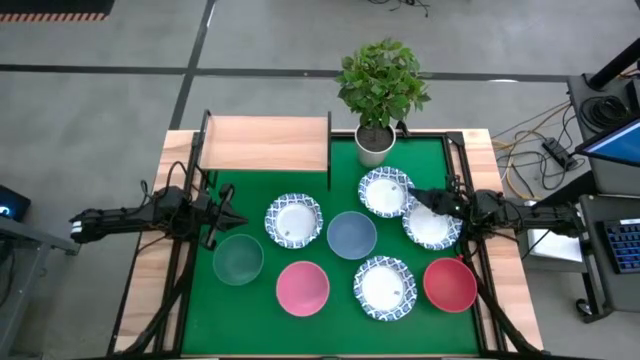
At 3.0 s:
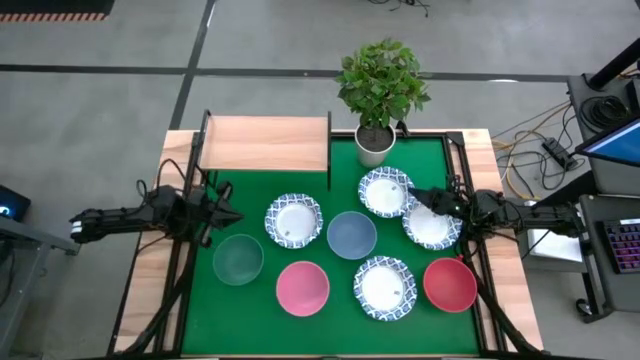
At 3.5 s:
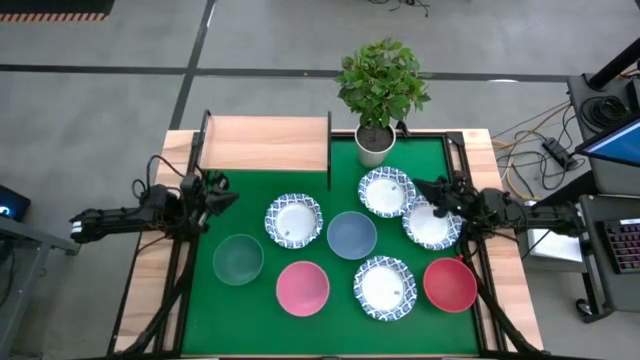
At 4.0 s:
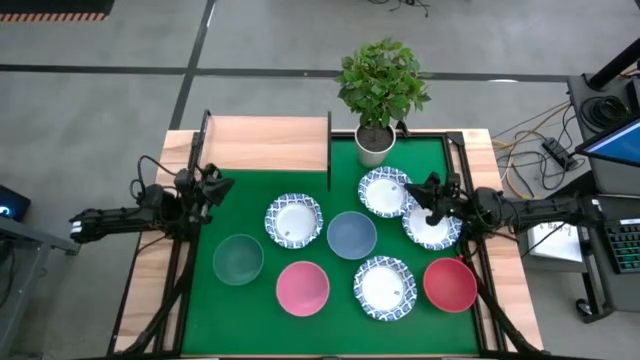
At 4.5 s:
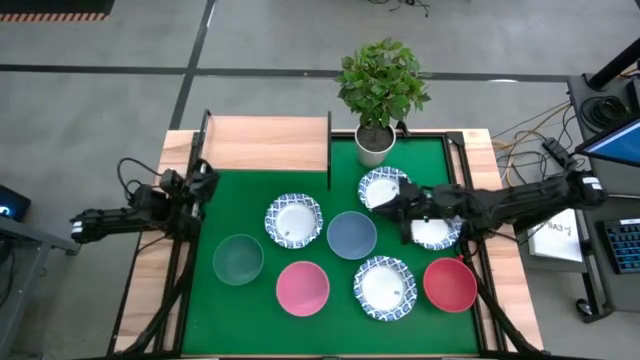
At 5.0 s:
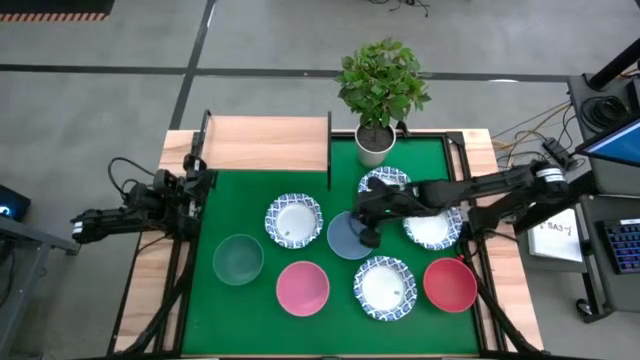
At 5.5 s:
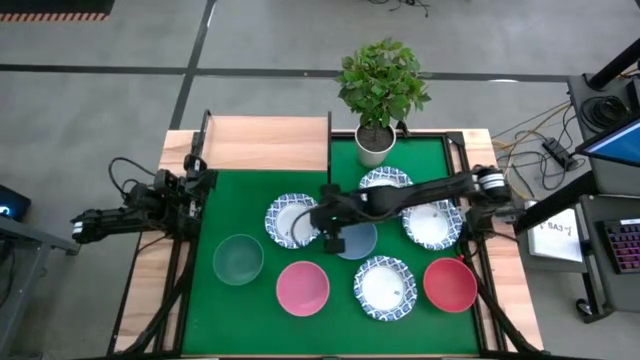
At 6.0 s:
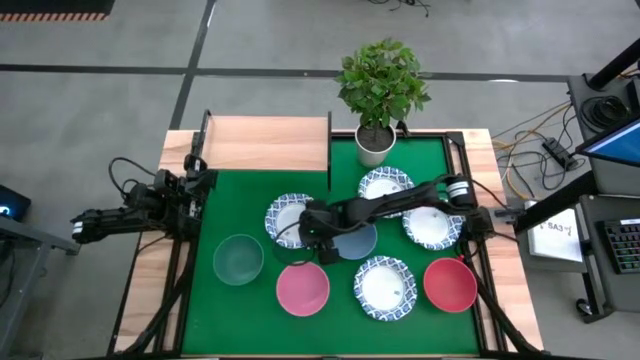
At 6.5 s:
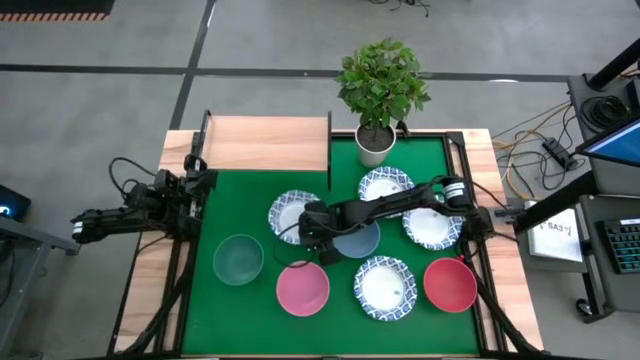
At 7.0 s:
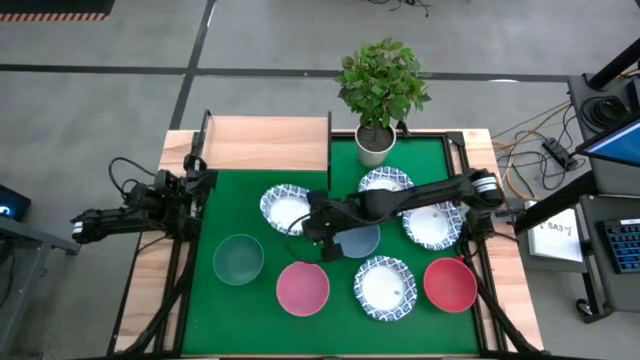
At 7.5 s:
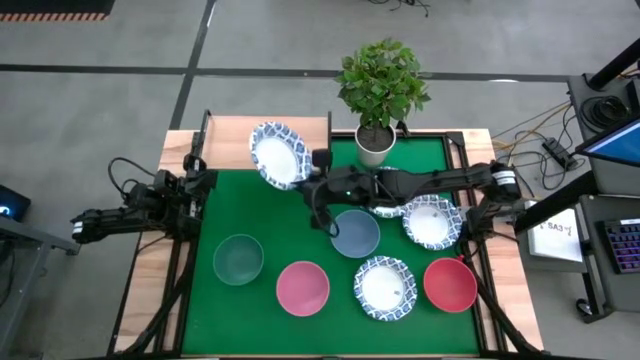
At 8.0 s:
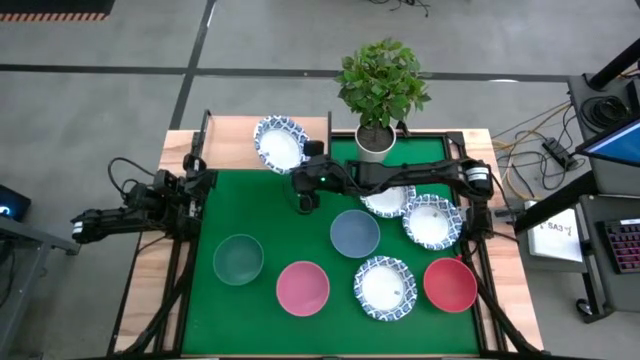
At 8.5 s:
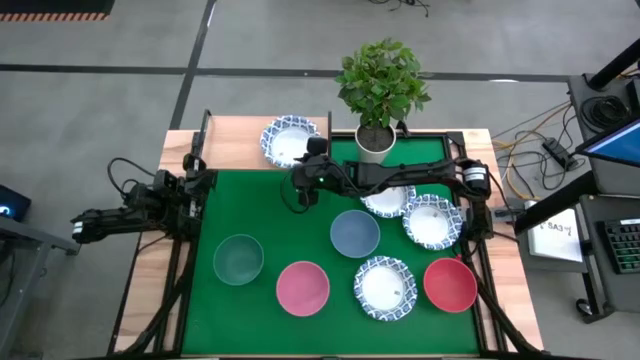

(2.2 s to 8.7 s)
Task: Place and stack bowls onto a shelf
Put the white patterned bowl on the shelf

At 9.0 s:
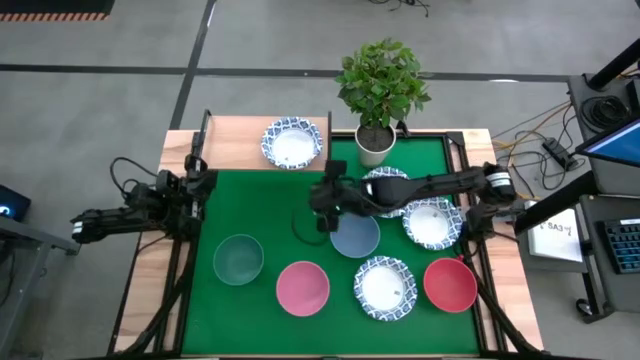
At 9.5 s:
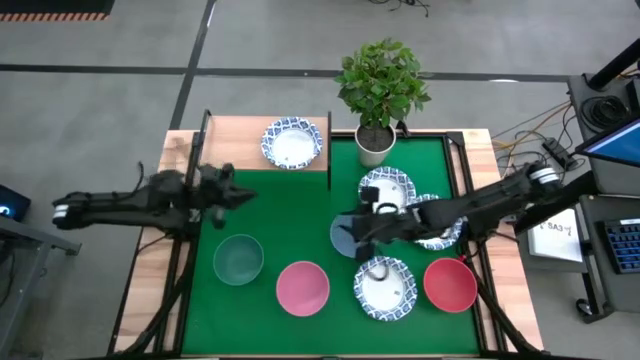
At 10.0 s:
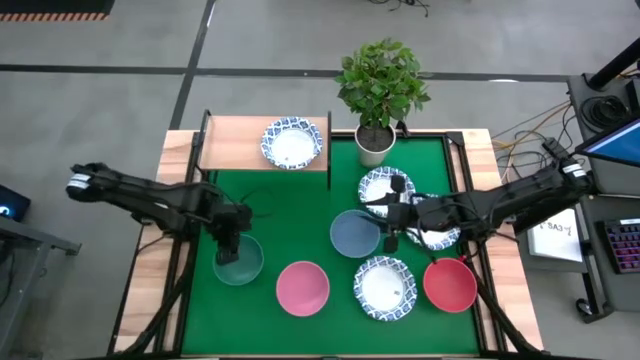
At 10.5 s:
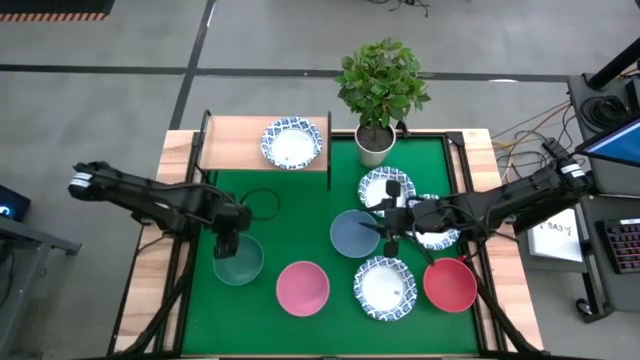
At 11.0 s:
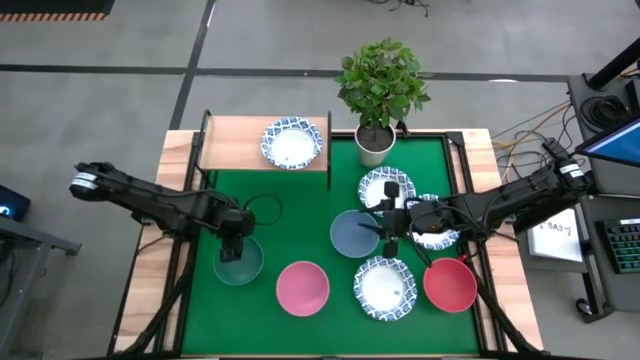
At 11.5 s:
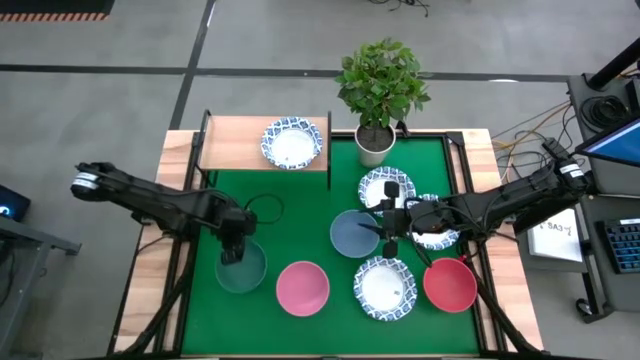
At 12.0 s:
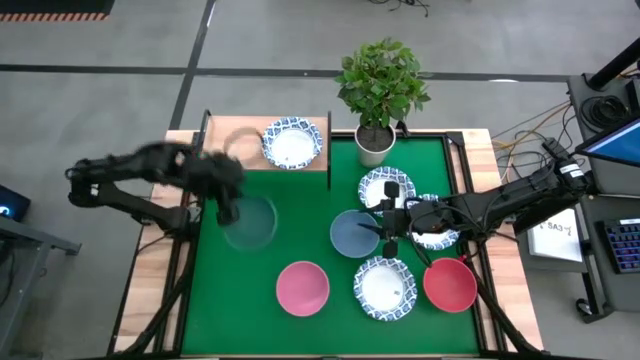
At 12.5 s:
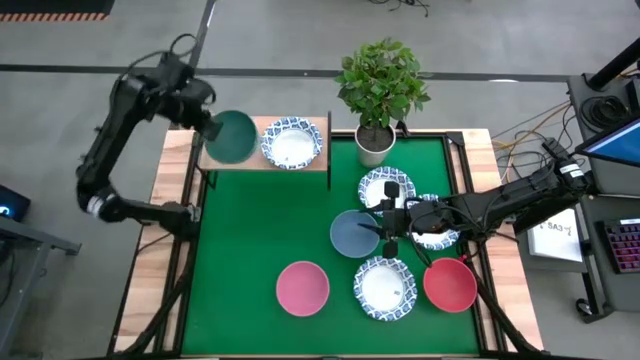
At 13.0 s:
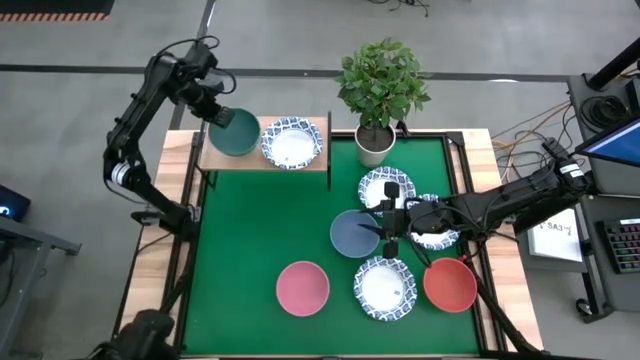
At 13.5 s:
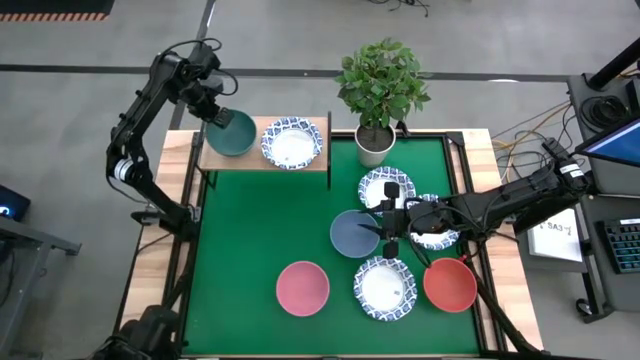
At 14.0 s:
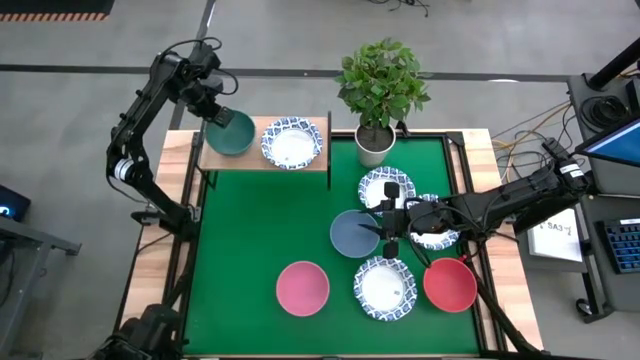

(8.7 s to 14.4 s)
Put the green bowl on the shelf

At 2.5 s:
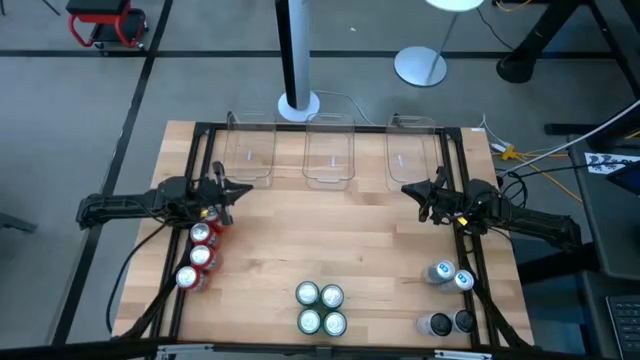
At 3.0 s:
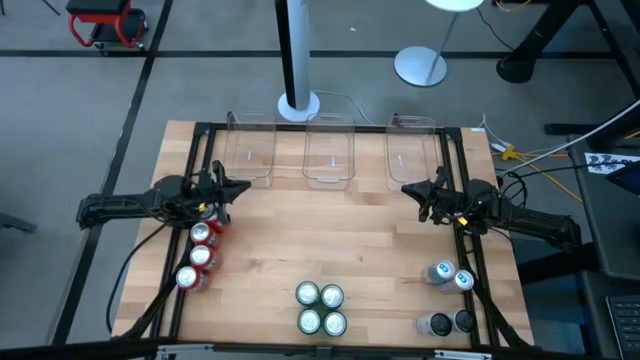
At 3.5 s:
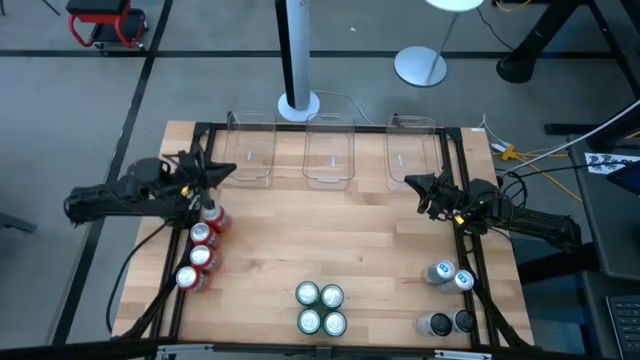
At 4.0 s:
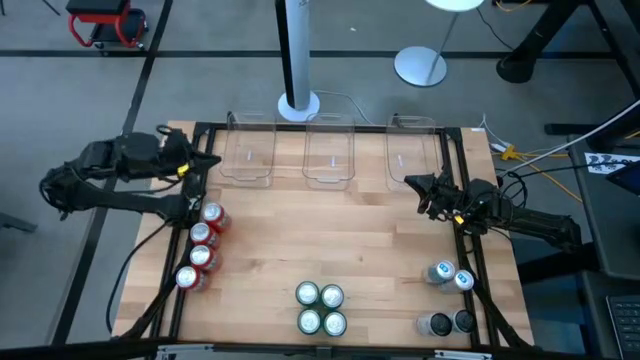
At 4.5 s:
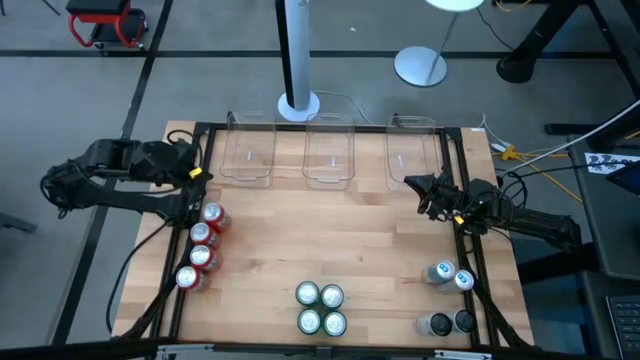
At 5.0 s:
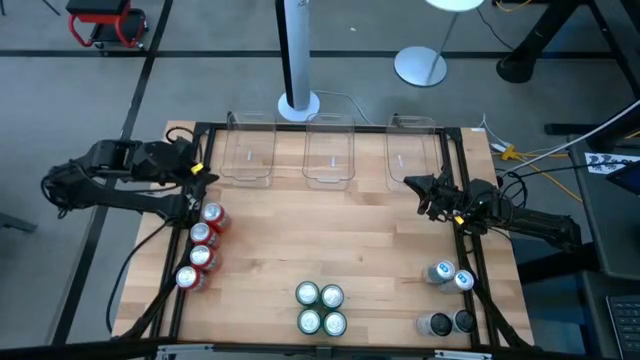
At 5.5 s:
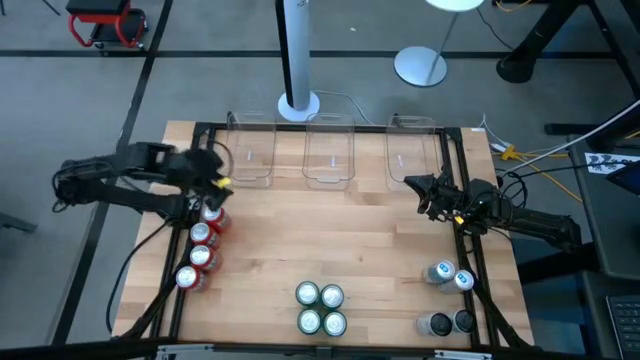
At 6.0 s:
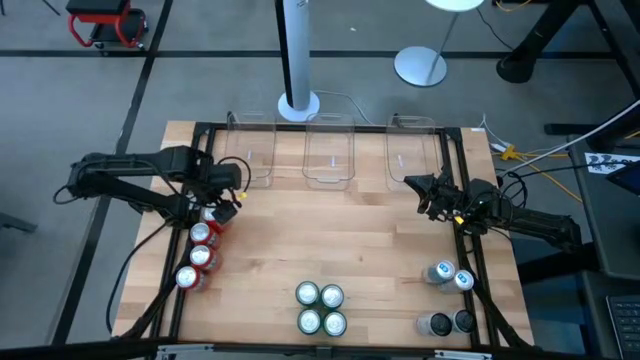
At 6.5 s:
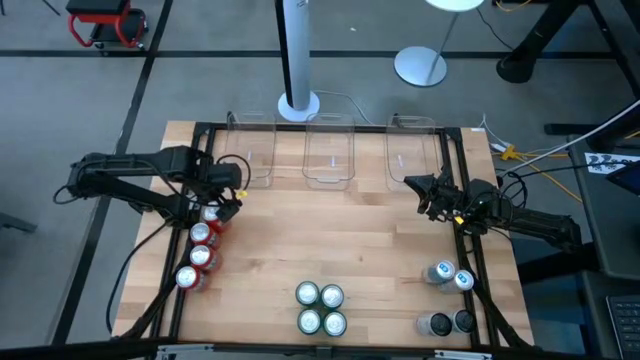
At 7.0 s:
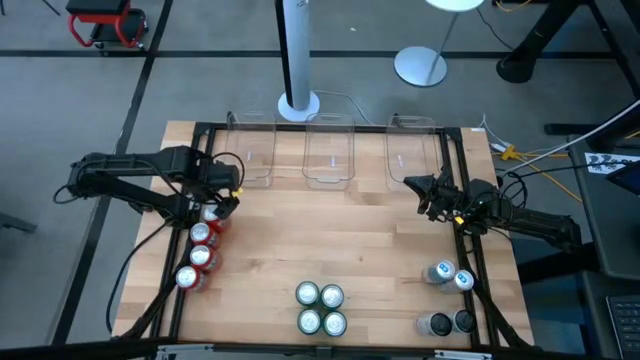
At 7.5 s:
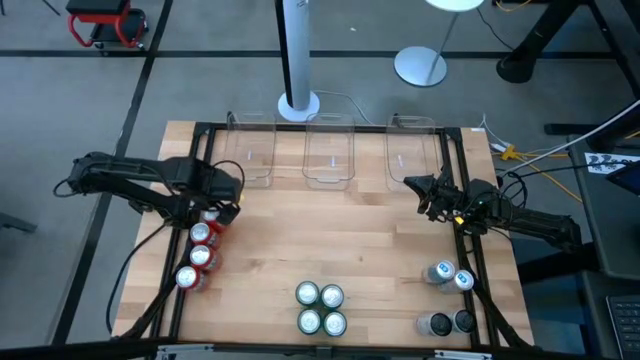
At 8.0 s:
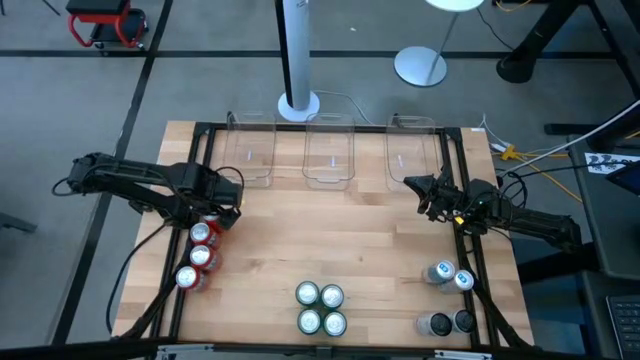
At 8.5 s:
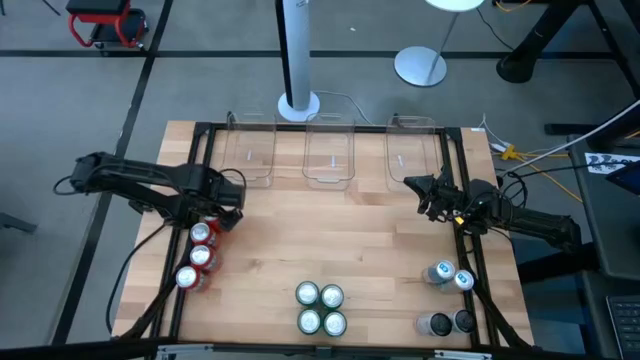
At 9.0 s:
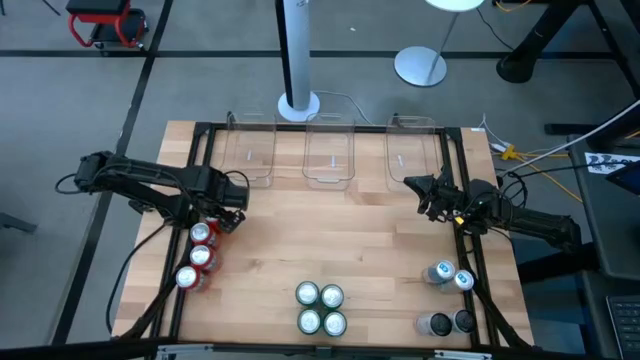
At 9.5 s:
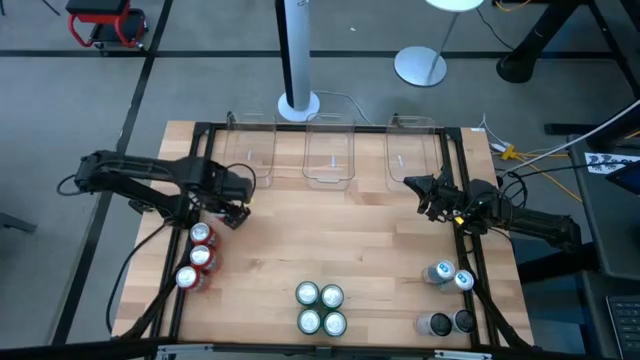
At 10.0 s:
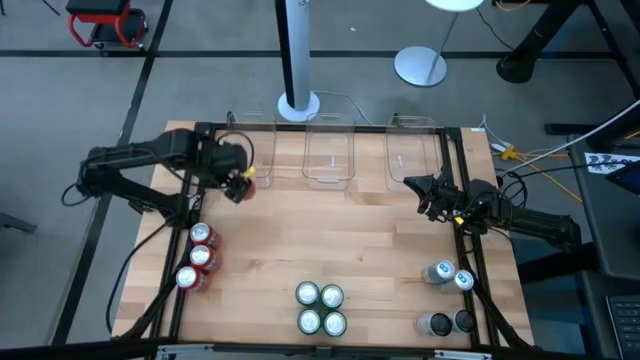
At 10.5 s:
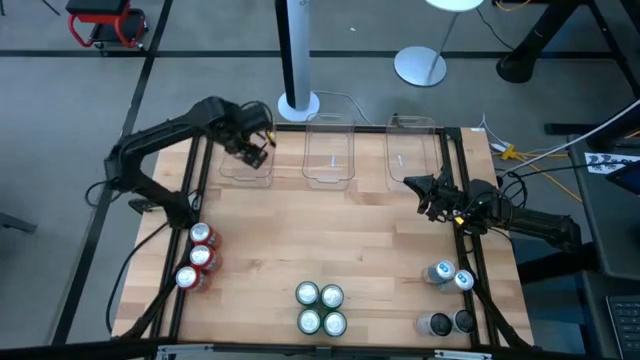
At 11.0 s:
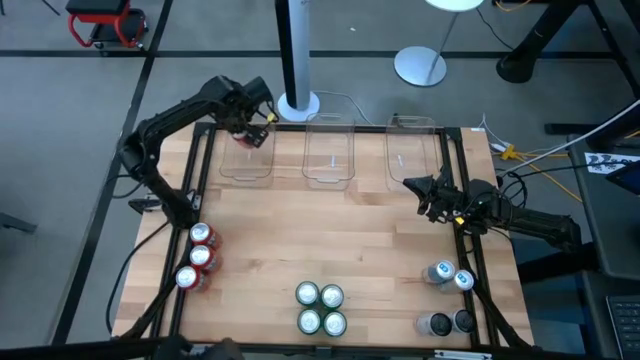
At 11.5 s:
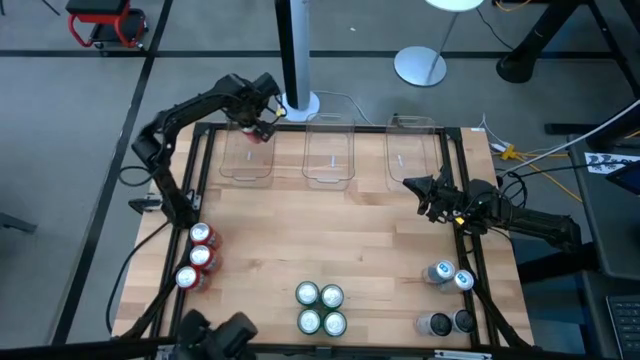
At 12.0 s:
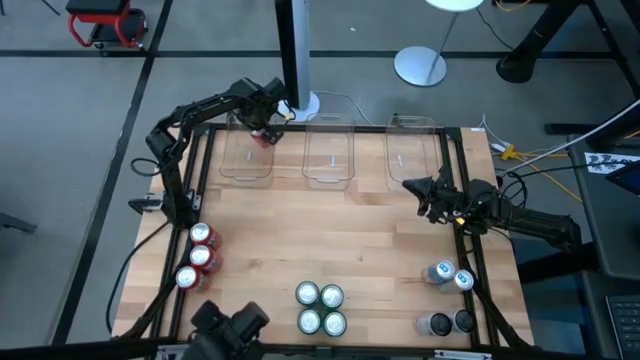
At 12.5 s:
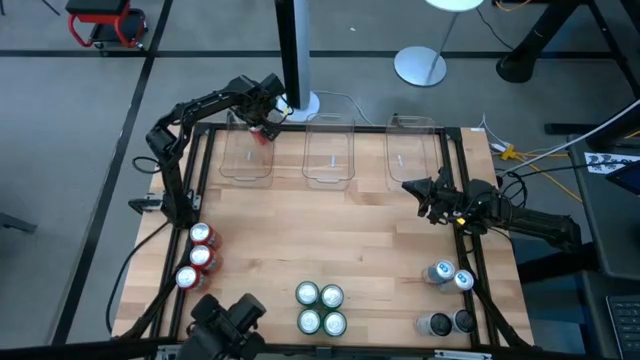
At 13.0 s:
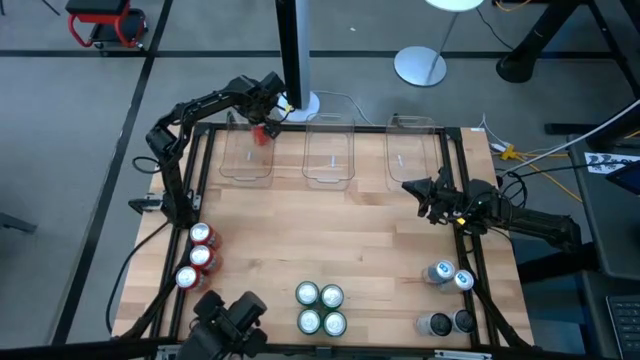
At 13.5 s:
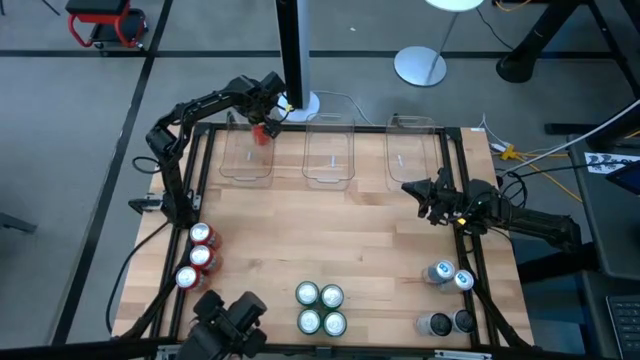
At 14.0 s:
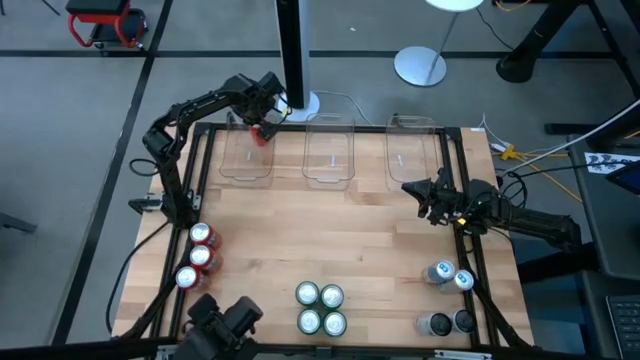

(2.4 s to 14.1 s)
Task: Sort soda cans
Put the top orange soda can into the left transparent bin
